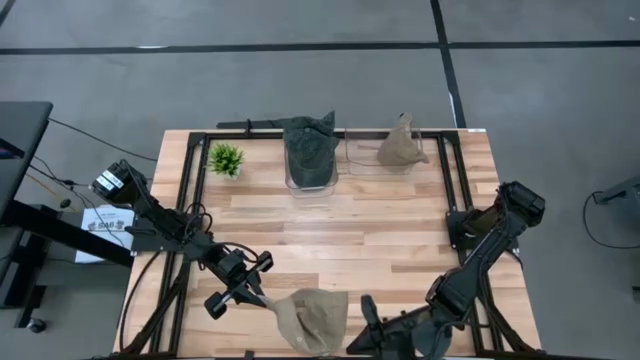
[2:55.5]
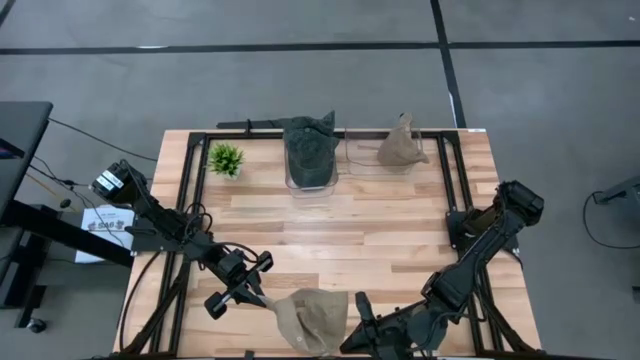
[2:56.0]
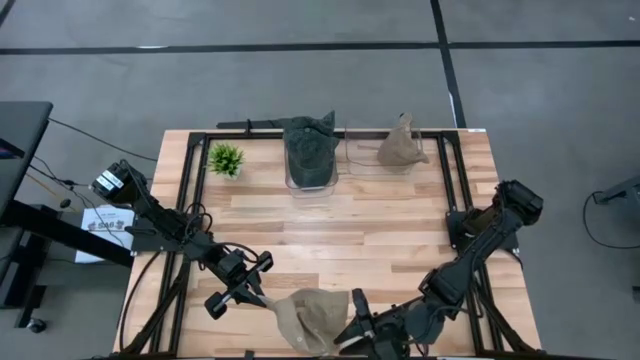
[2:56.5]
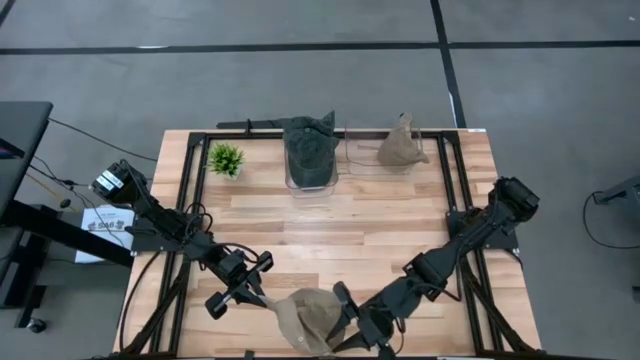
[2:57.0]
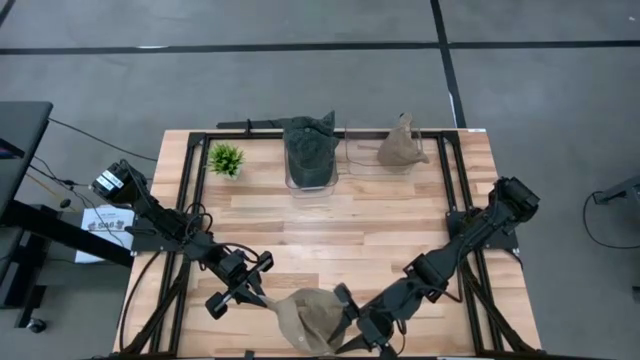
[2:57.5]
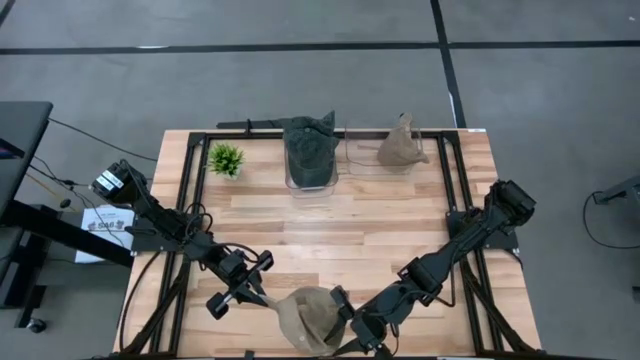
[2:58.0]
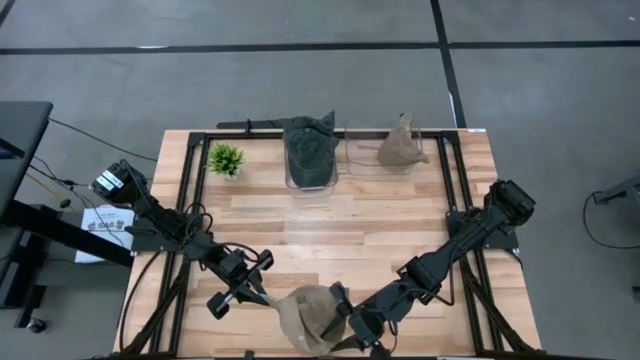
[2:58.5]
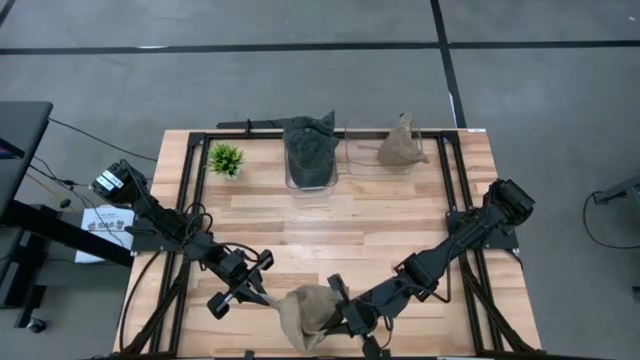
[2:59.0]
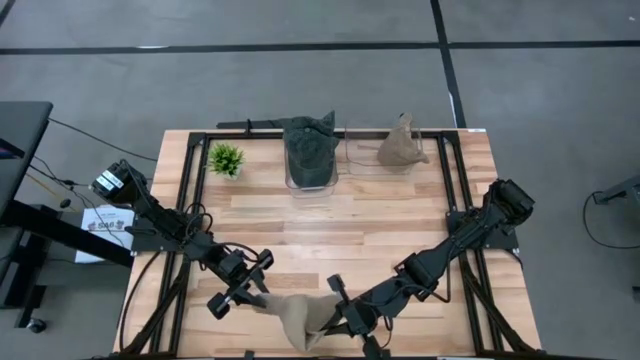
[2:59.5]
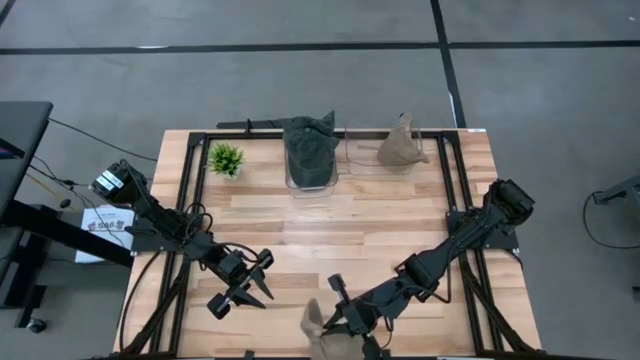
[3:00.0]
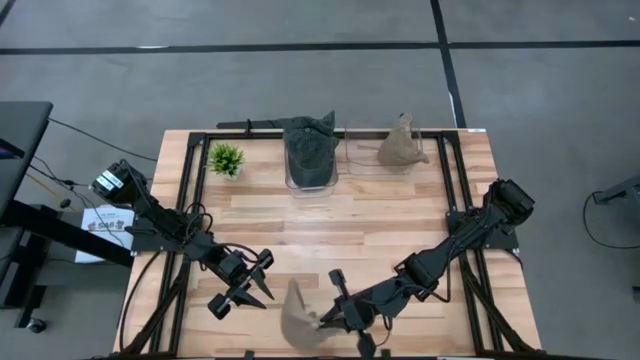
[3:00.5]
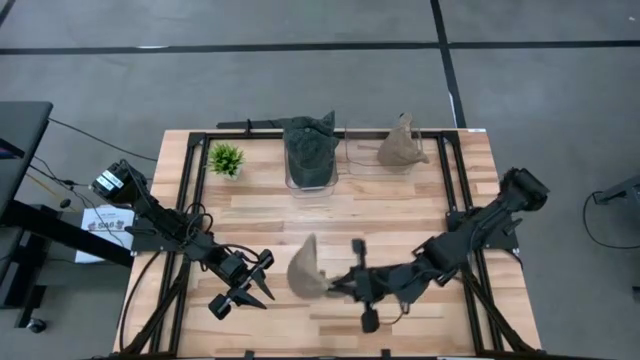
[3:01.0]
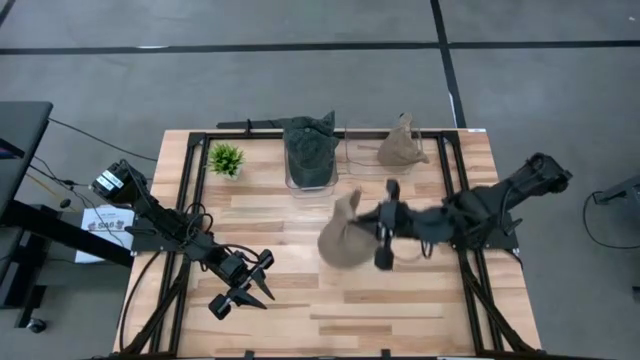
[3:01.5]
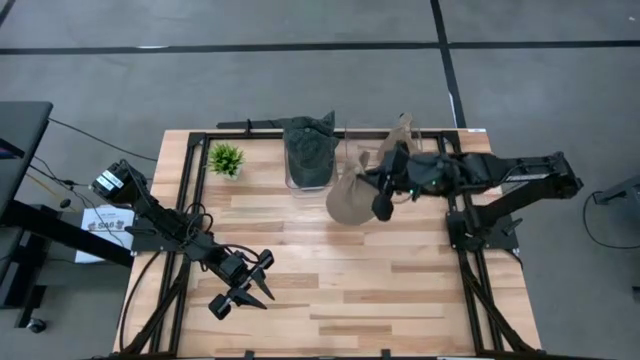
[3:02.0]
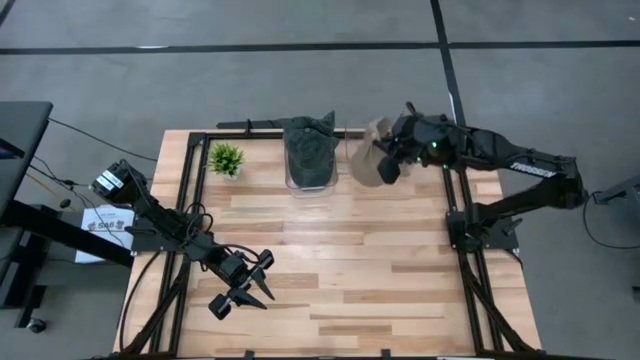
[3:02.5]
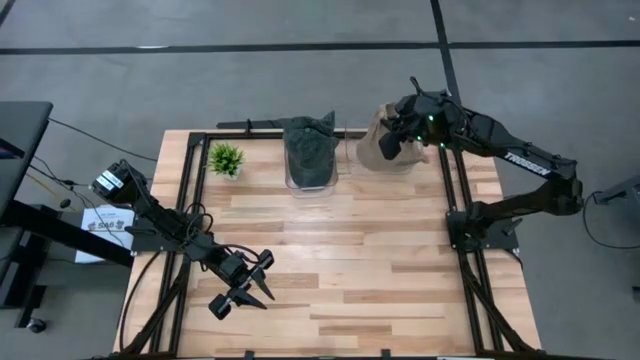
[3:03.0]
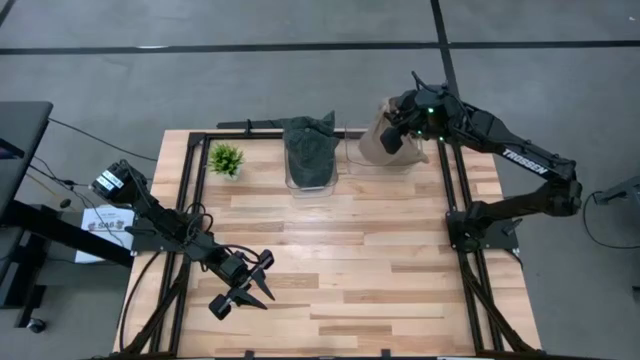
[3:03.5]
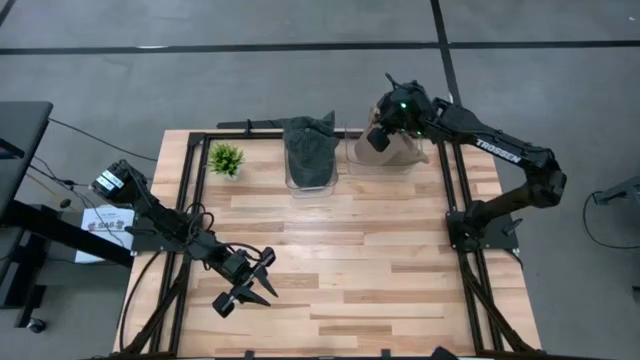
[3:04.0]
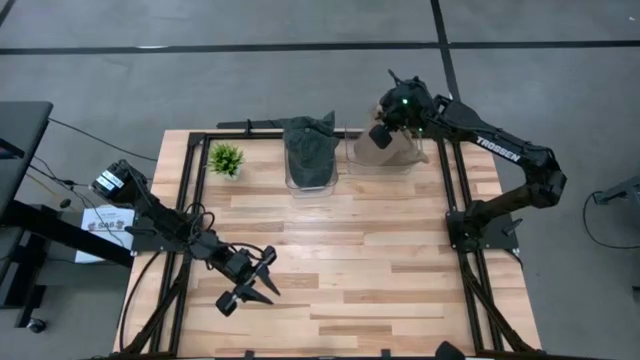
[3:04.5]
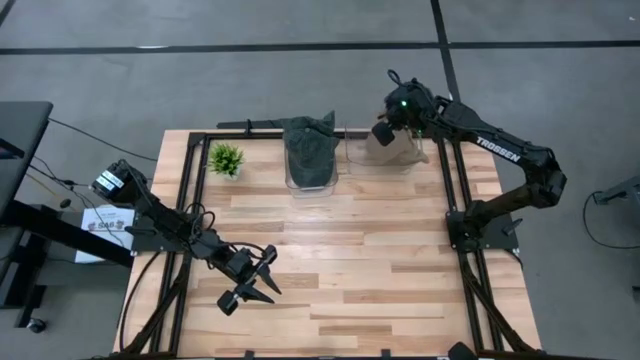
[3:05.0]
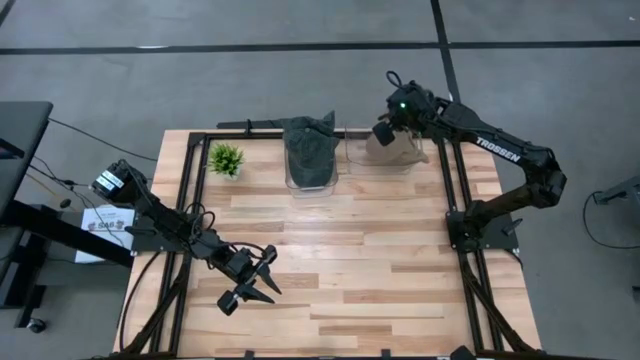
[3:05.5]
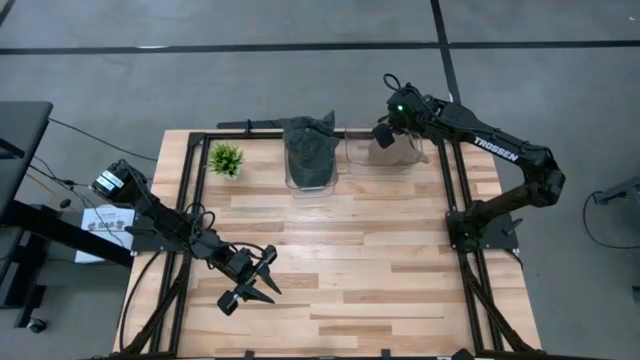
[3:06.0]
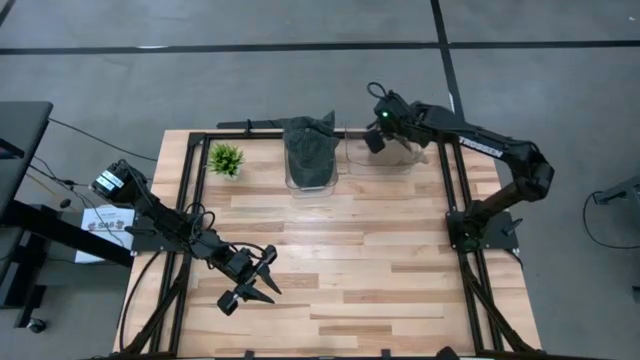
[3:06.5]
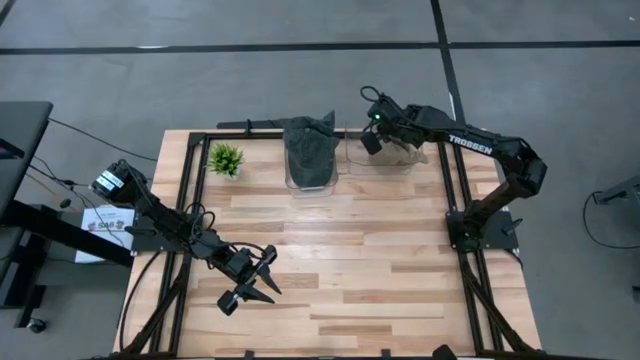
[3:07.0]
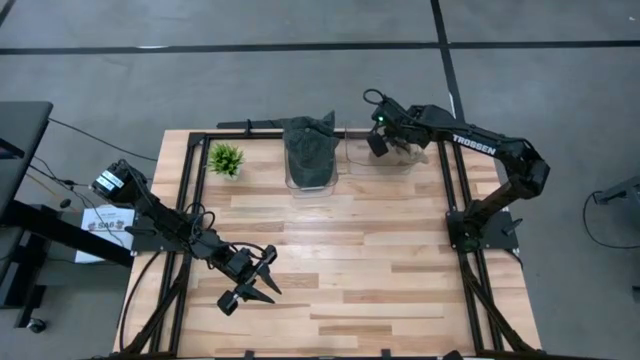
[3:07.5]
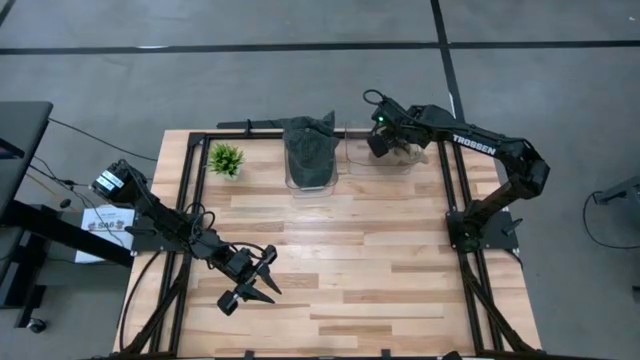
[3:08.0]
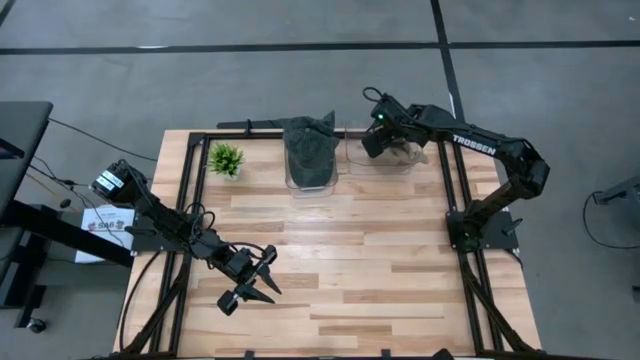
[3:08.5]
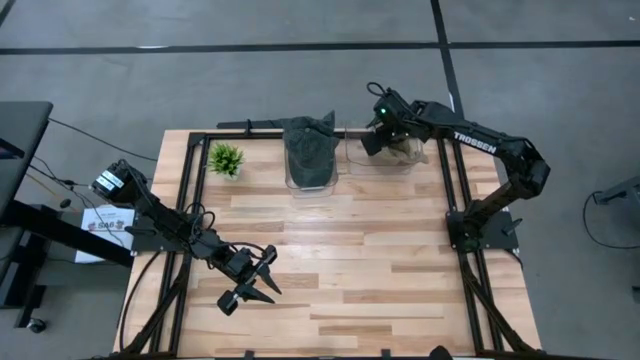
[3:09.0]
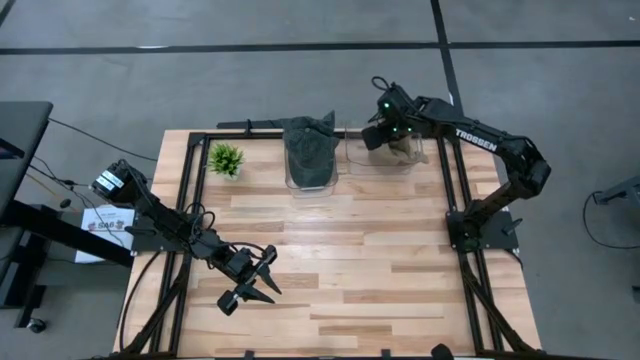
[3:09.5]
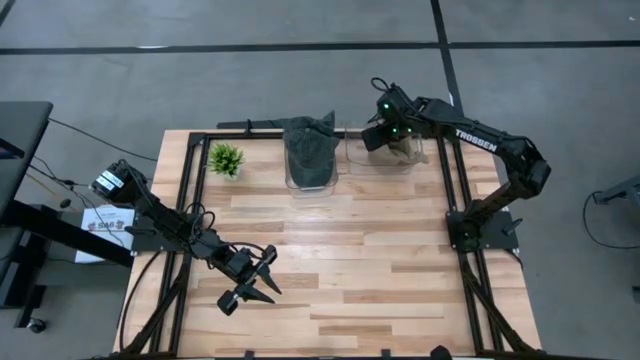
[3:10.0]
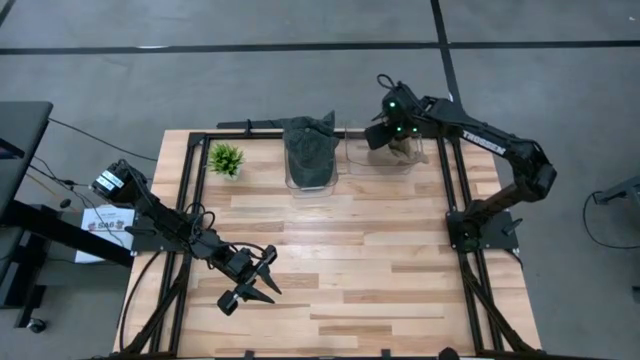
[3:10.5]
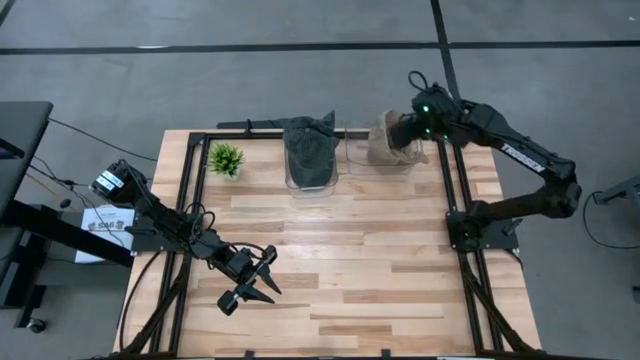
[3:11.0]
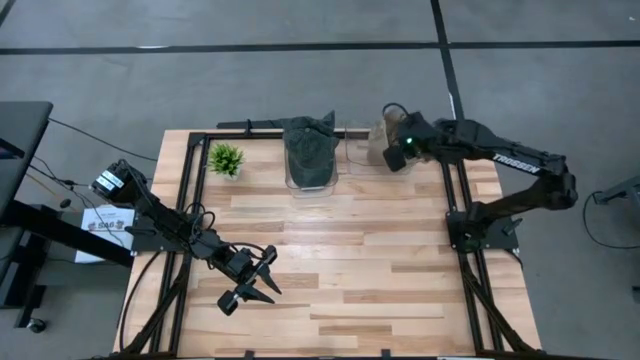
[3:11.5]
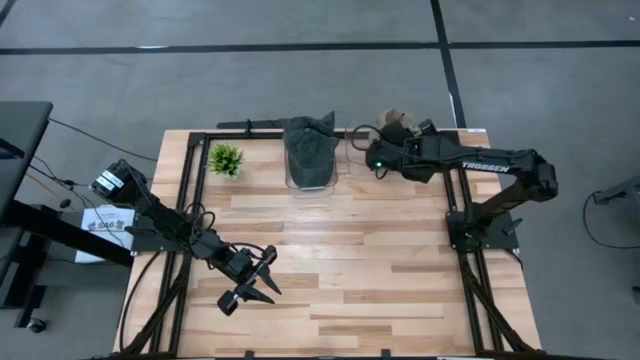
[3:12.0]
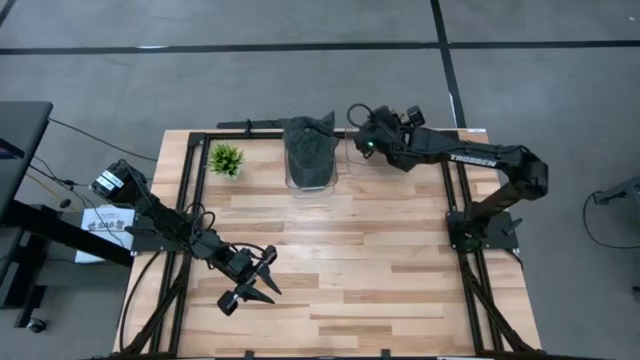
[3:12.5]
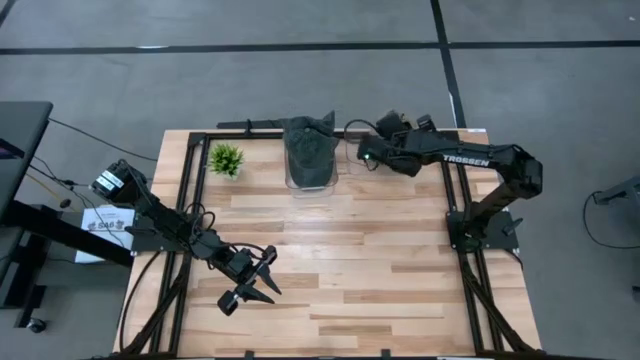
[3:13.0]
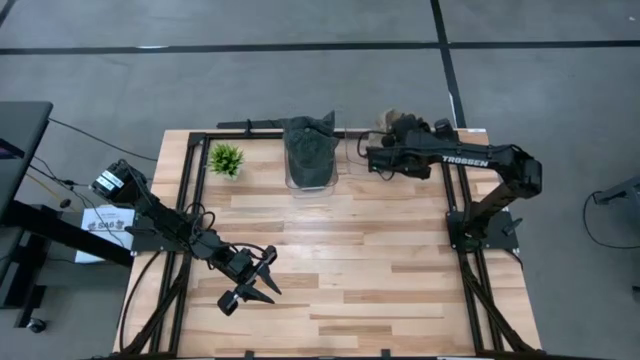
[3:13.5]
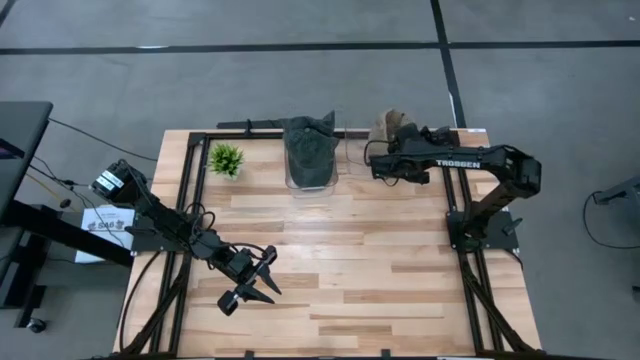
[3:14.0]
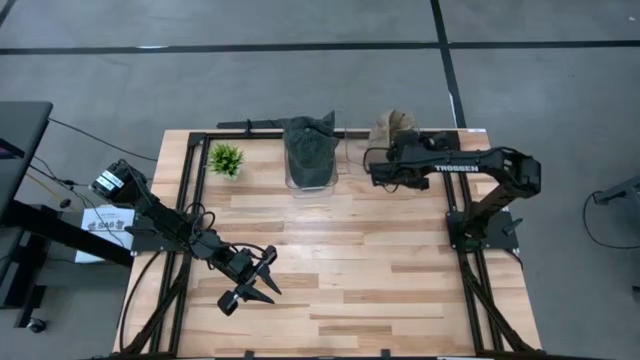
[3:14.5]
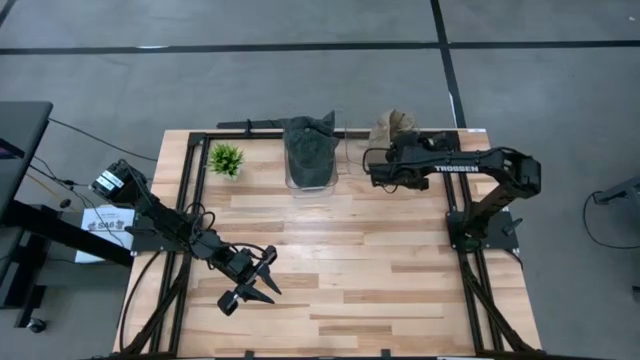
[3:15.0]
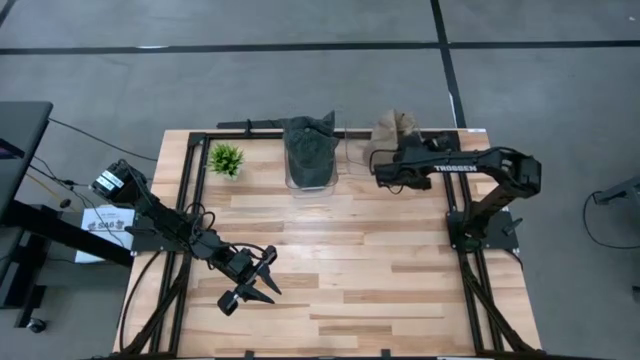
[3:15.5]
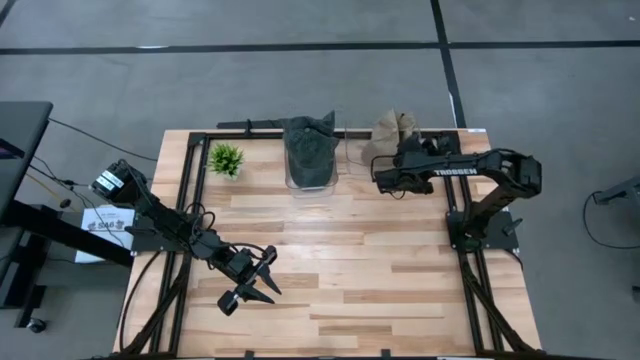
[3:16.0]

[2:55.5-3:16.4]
Task: Pick & Place hat
Put the brown cap into the right transparent bin

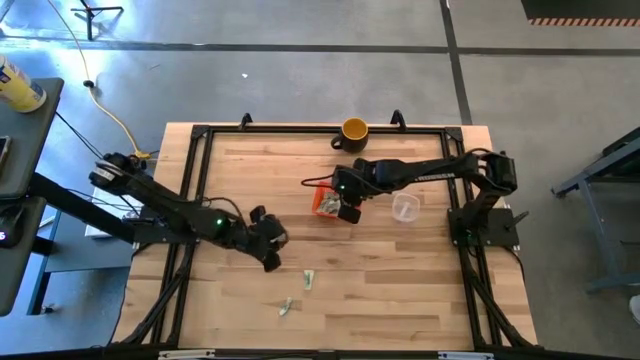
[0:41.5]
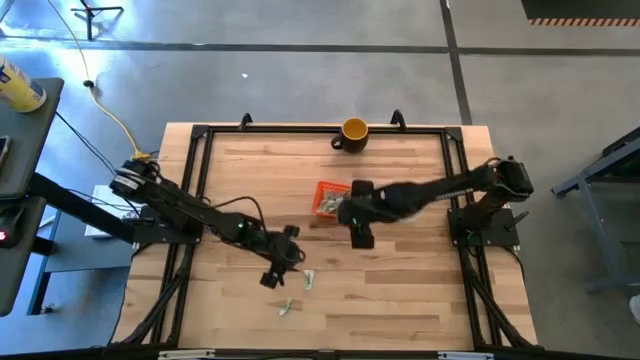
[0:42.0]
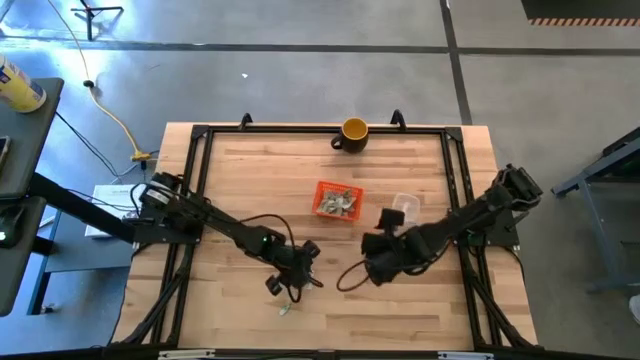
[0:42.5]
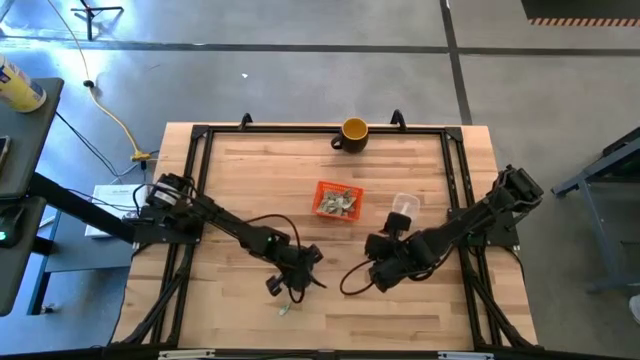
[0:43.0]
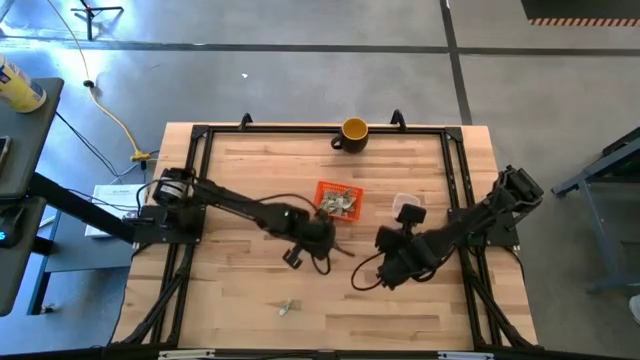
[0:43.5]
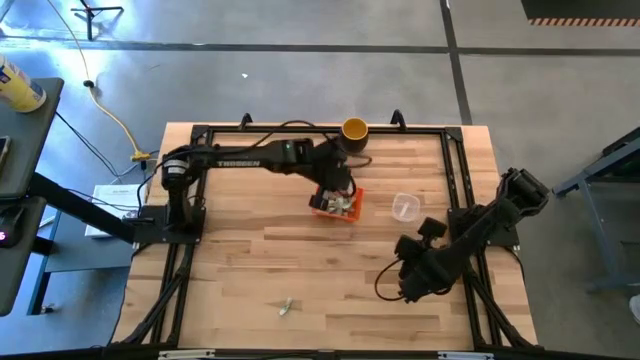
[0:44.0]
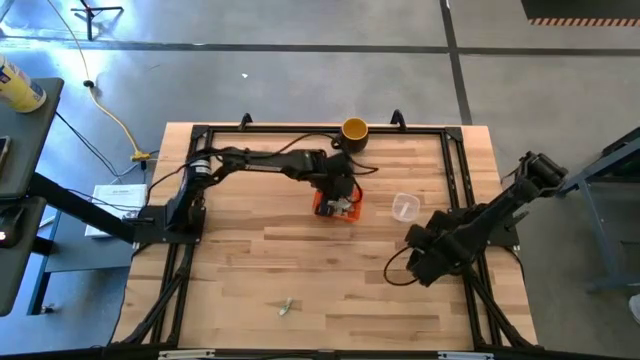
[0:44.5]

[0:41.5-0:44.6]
Task: Pick and place items into bin
Put the white stevia packet into the orange bin
